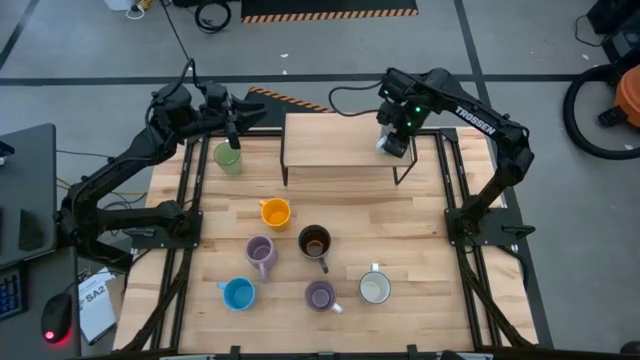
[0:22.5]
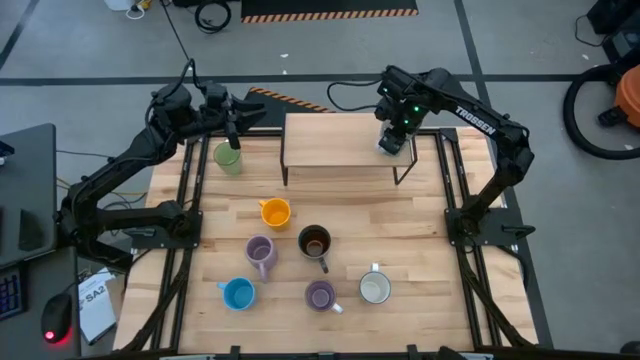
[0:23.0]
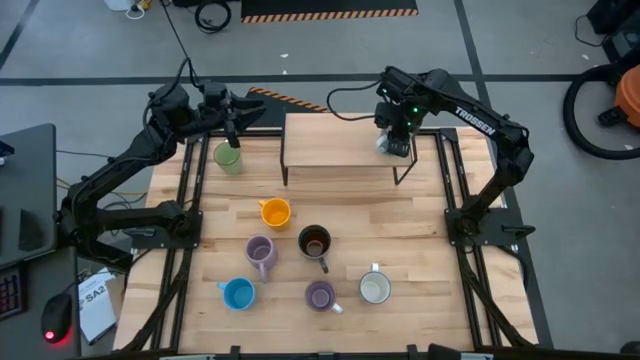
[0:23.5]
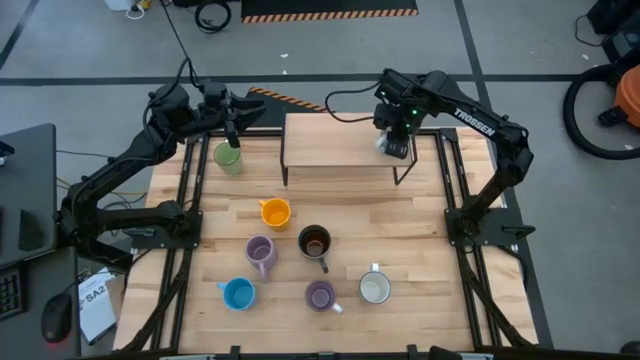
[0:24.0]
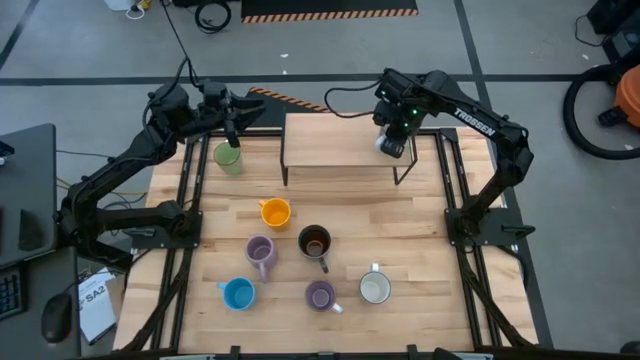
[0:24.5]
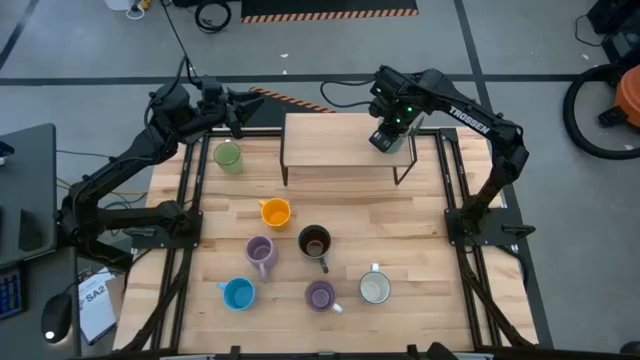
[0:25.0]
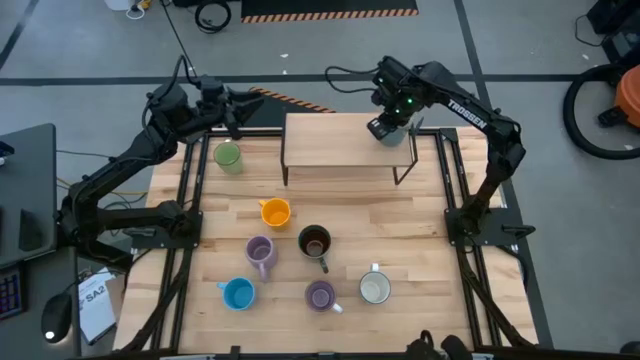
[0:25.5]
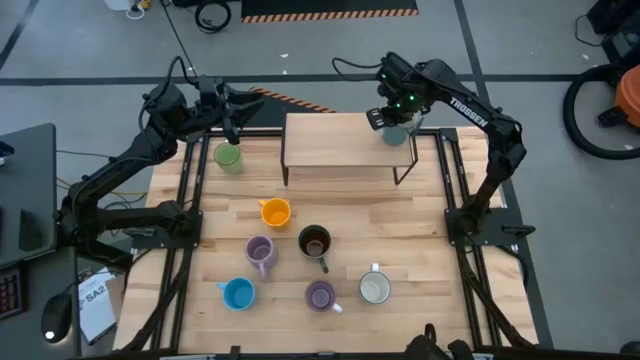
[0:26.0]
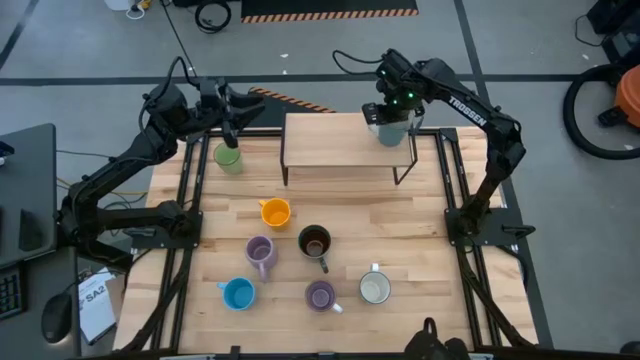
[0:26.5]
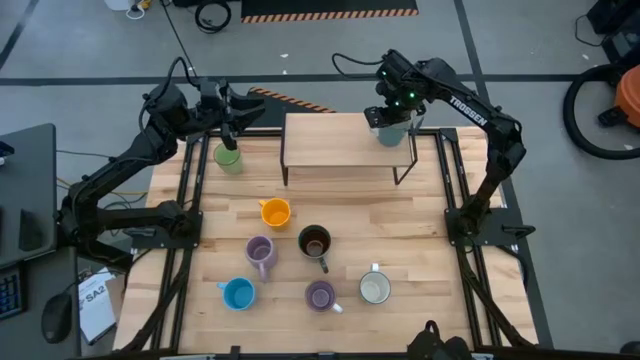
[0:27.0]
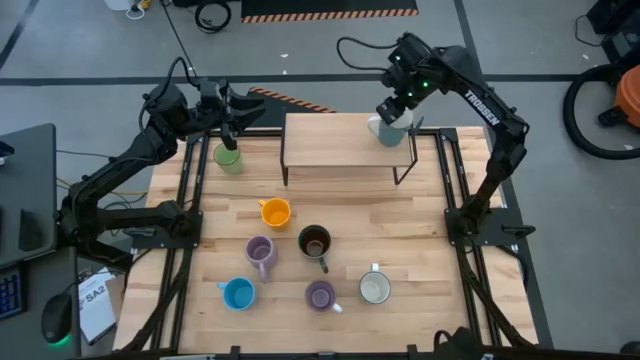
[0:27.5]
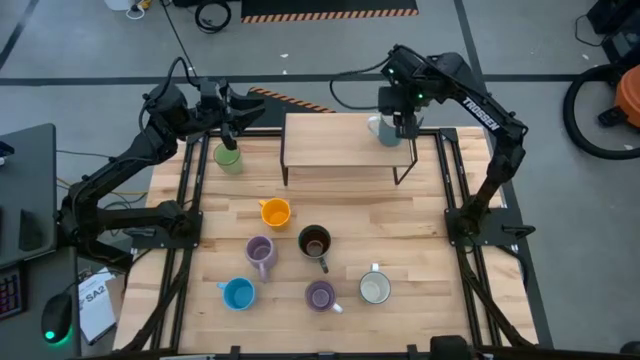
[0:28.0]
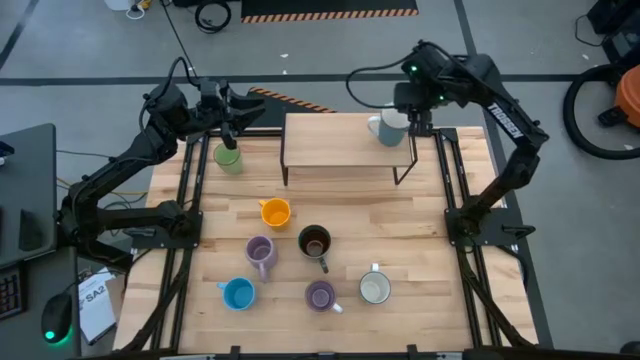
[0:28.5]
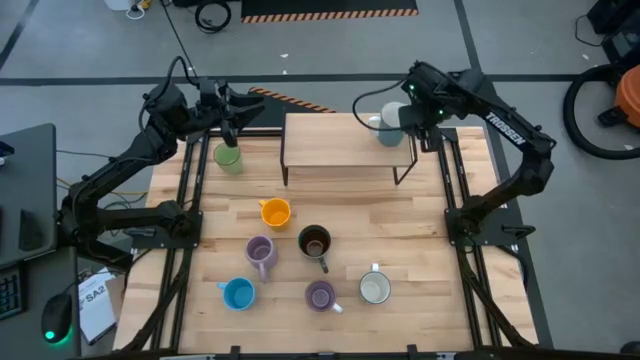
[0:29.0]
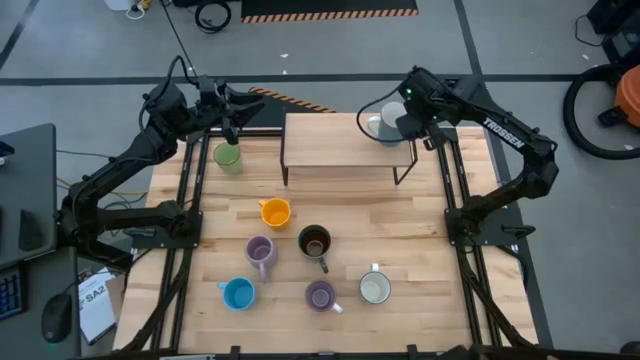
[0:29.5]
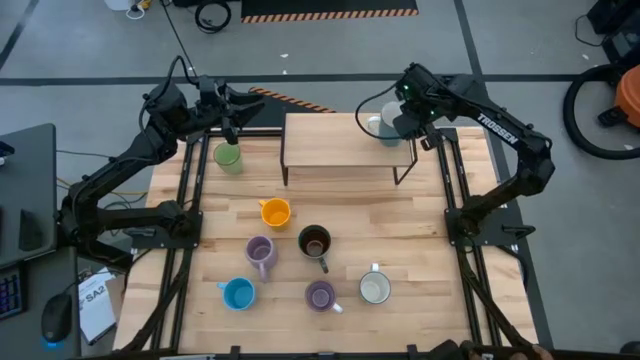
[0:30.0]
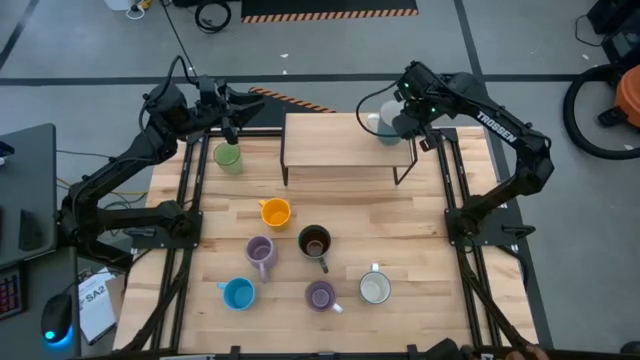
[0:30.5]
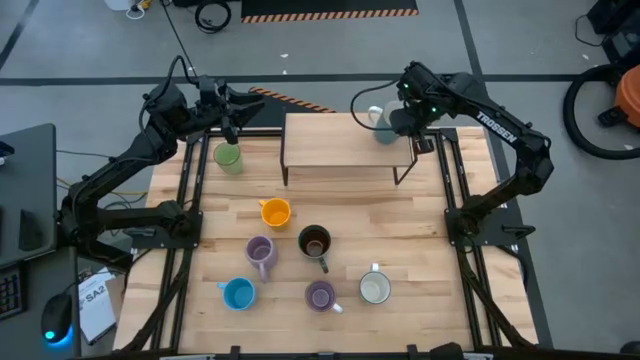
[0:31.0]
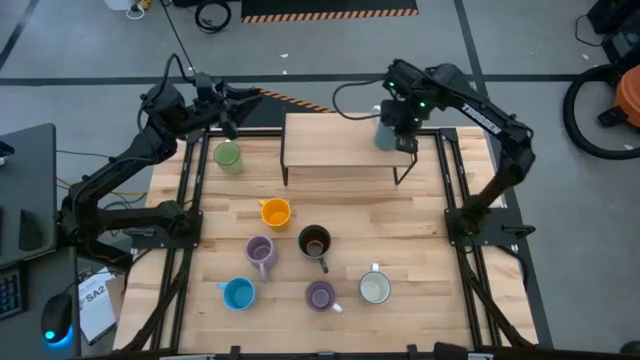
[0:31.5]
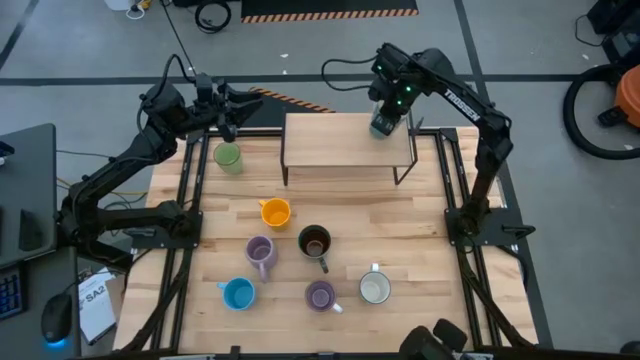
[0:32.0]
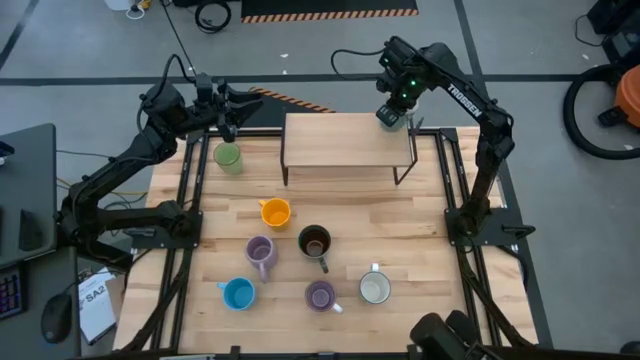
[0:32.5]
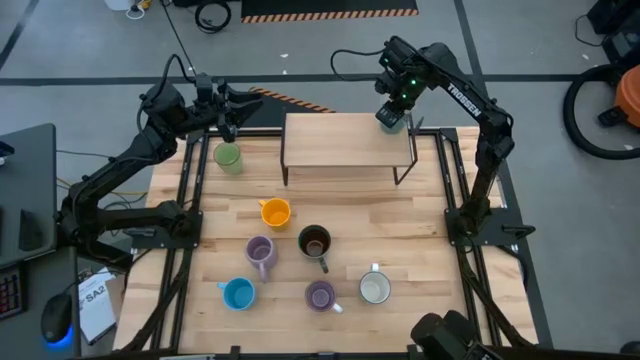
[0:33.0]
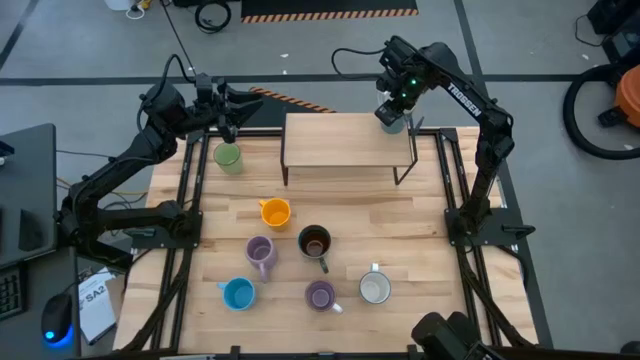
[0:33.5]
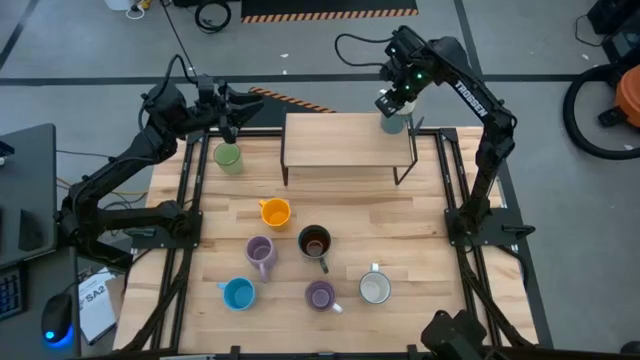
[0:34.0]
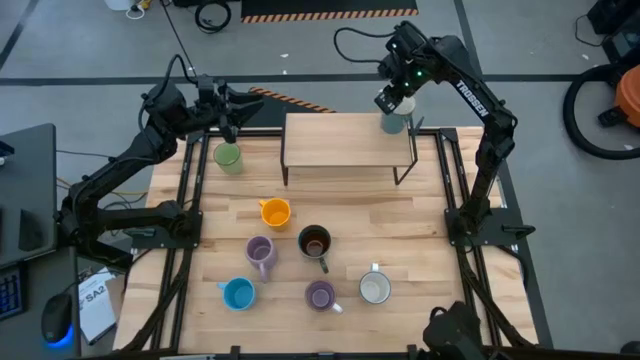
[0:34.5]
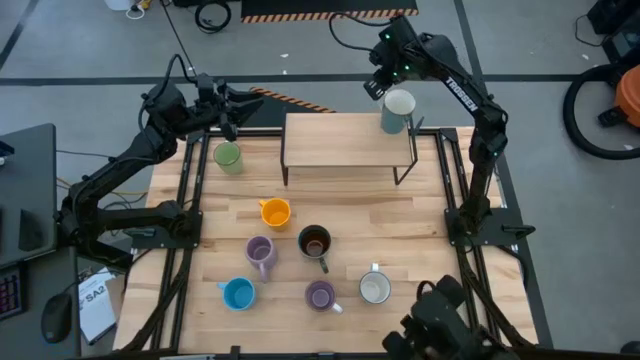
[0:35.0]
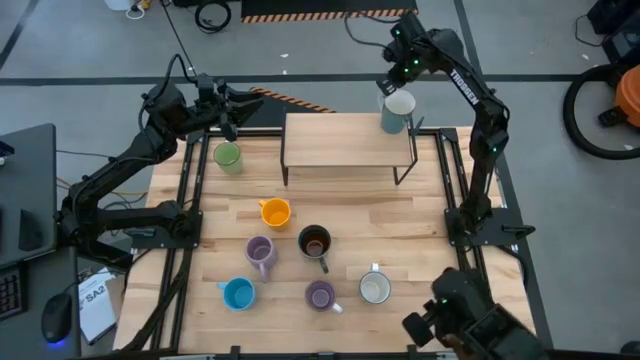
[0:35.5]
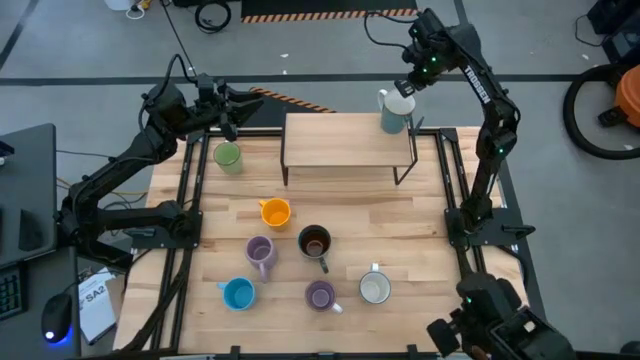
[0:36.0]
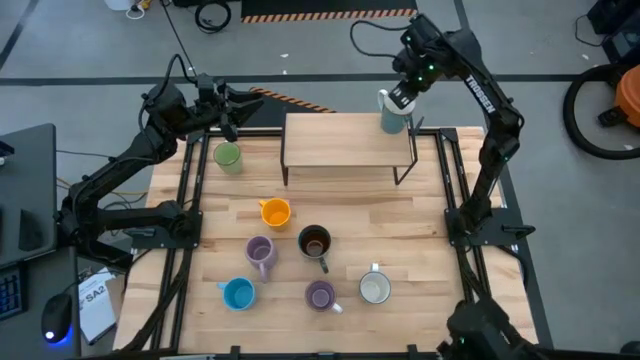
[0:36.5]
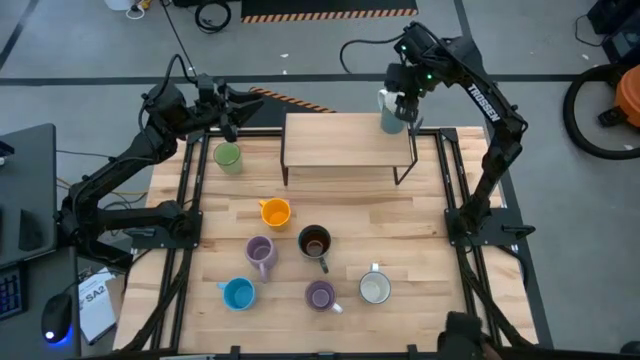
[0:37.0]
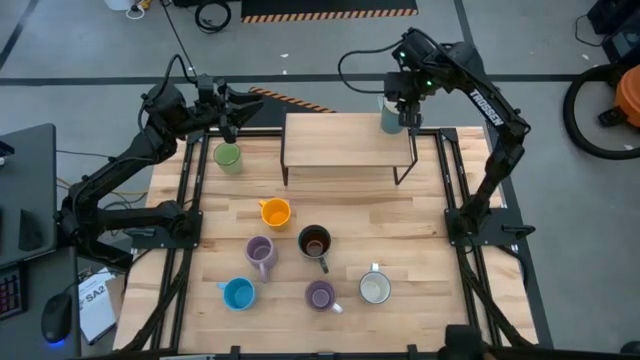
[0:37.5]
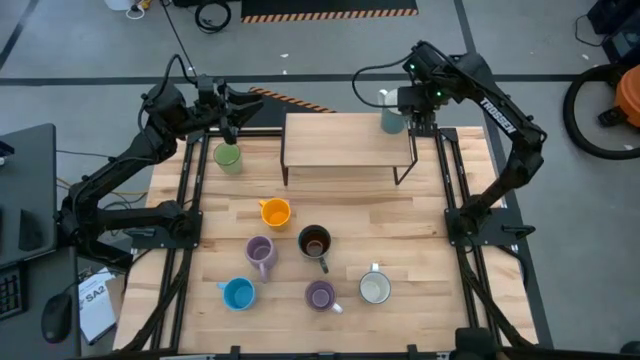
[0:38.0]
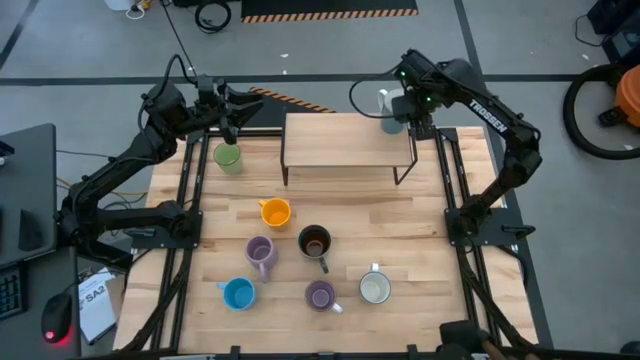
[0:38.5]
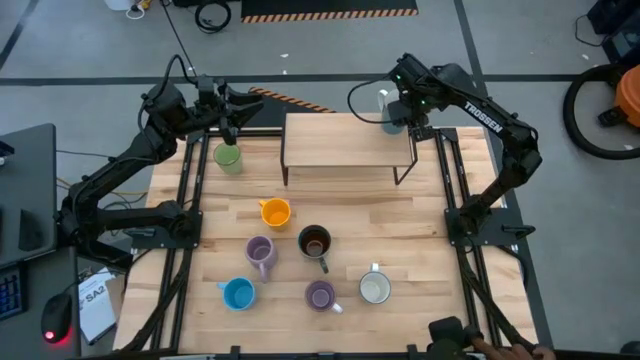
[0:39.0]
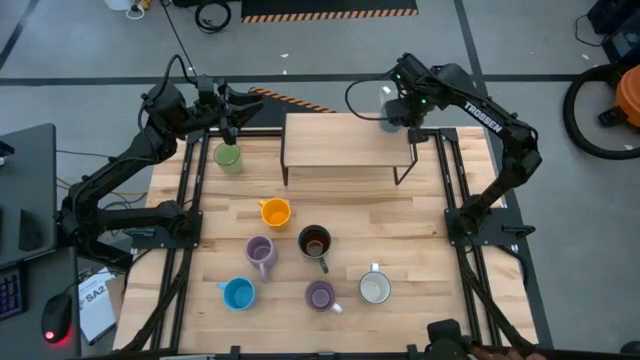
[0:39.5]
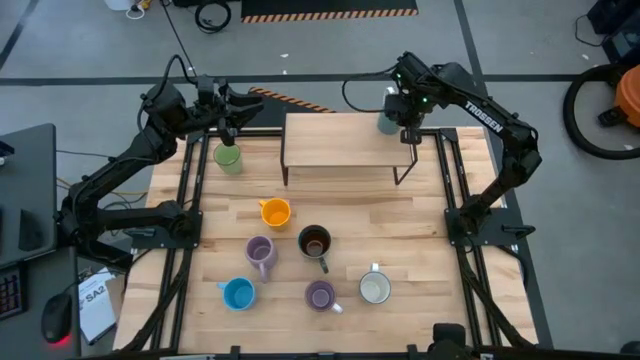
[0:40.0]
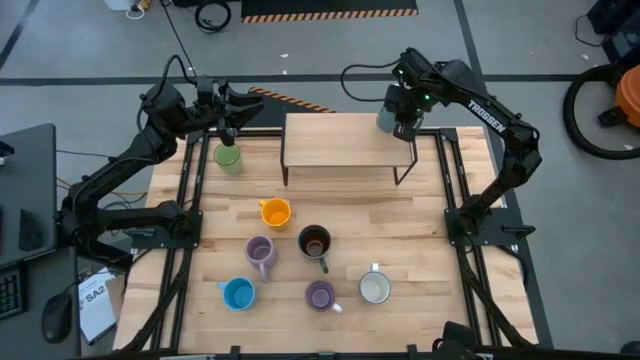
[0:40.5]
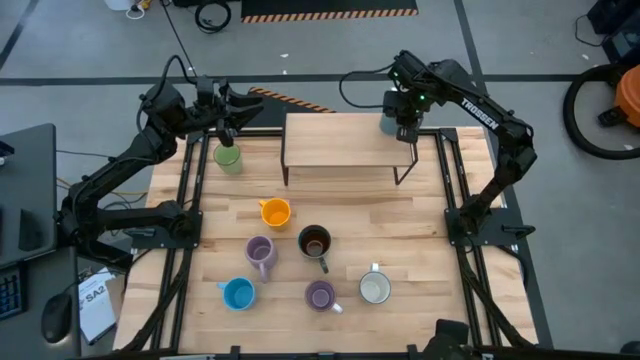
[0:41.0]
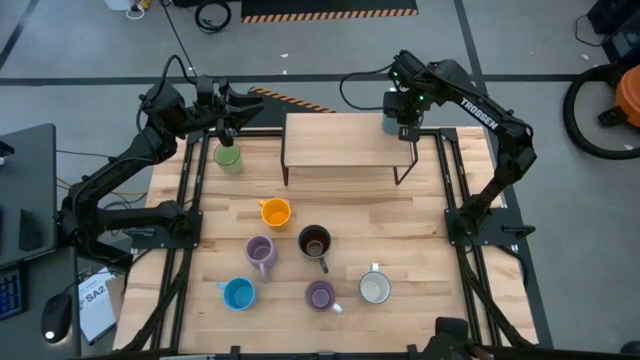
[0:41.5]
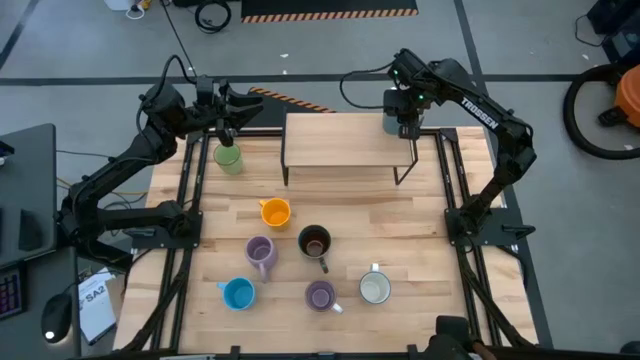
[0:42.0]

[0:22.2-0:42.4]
Task: Place coffee mugs
Put the blue and white mug on the shelf
